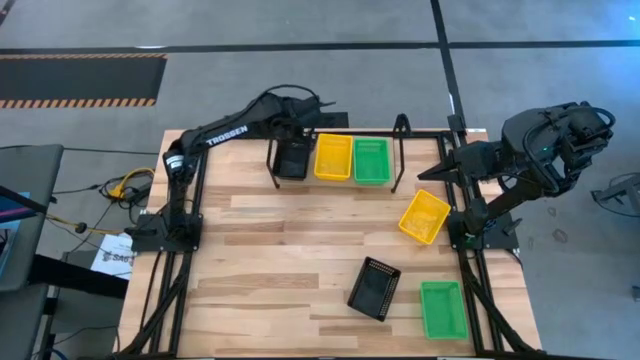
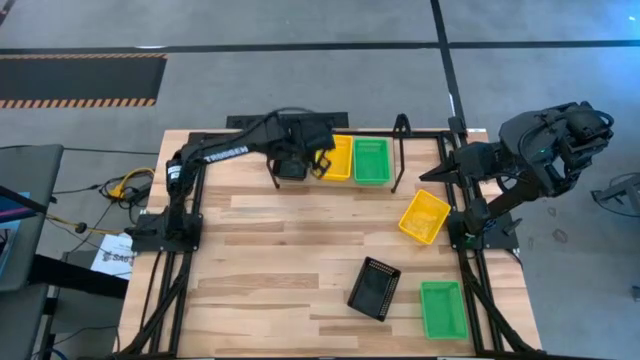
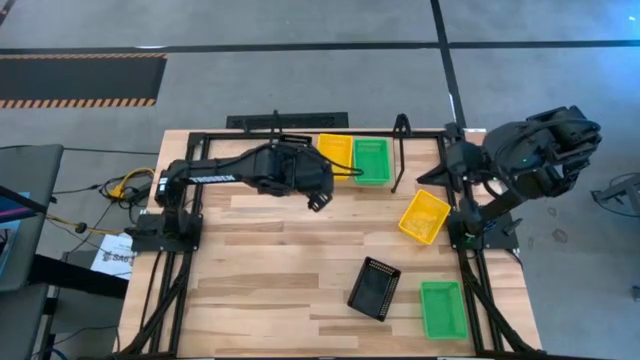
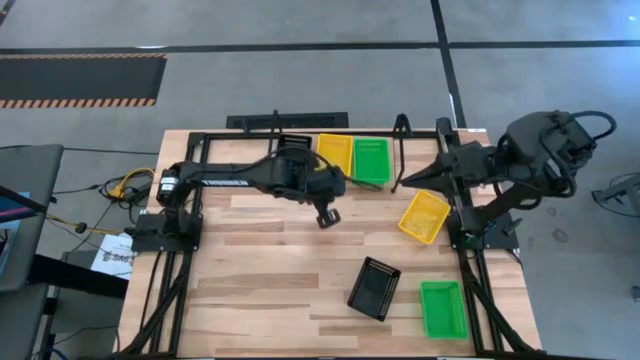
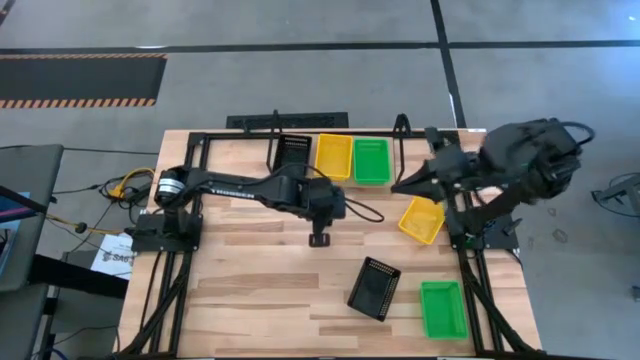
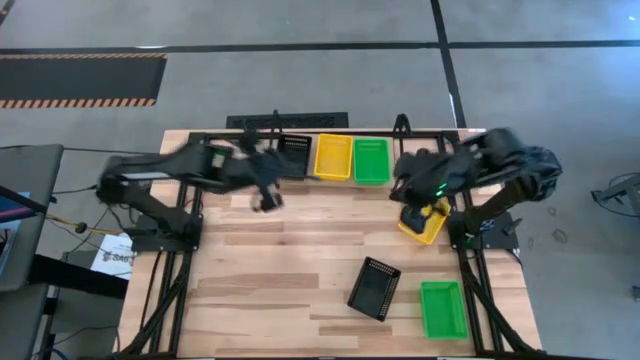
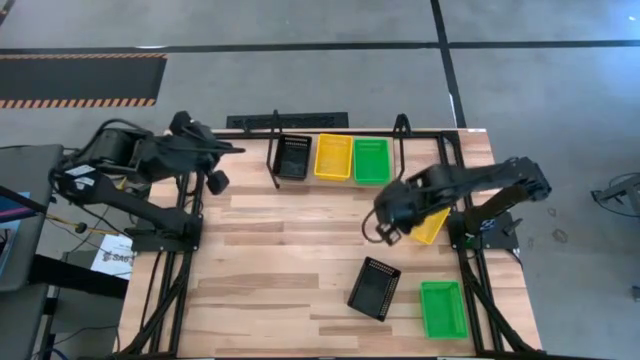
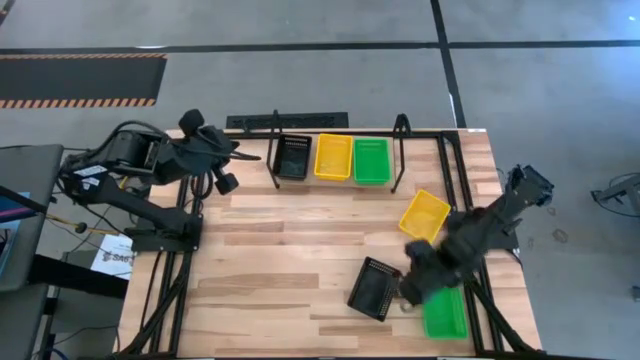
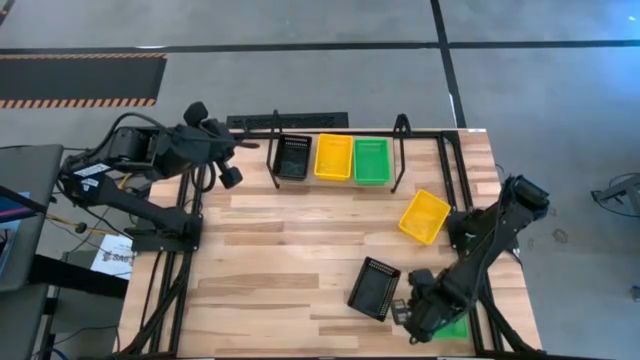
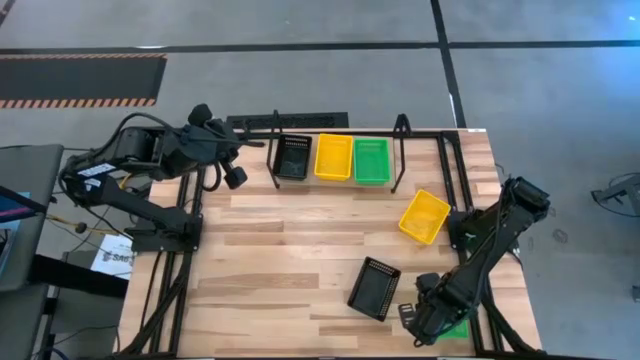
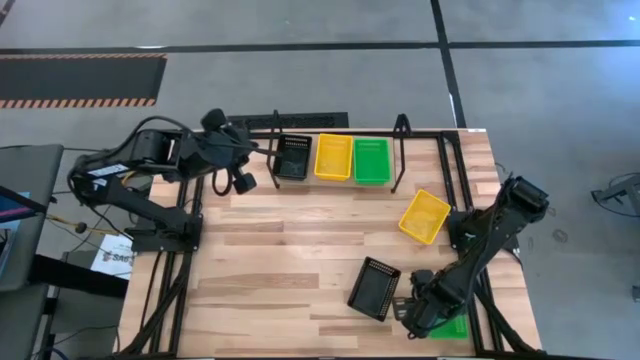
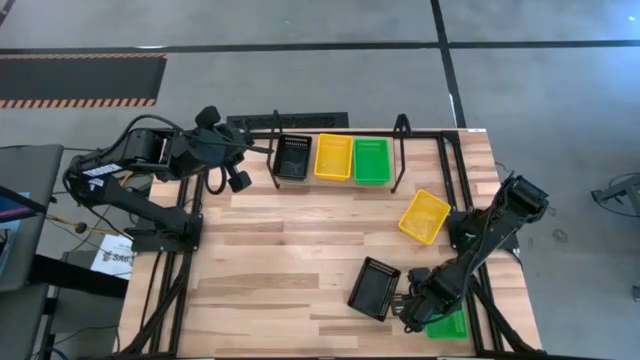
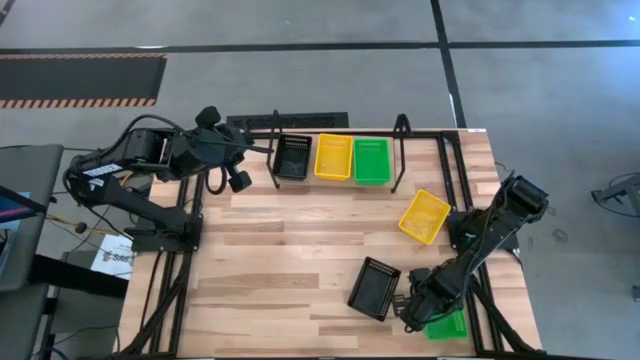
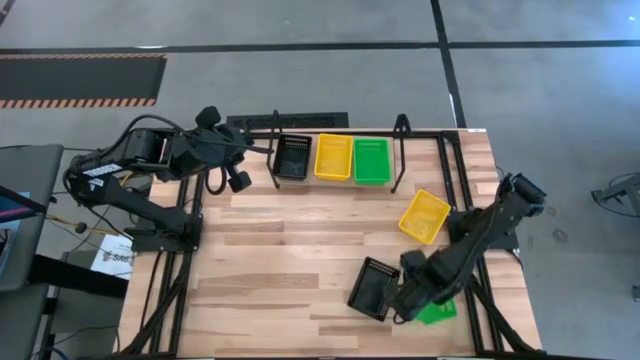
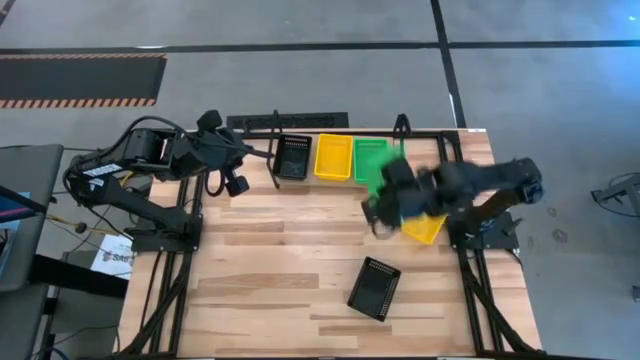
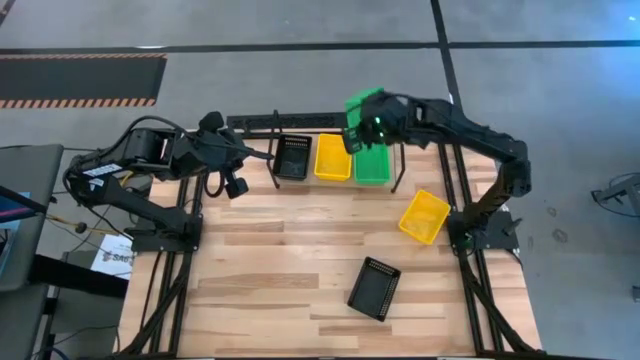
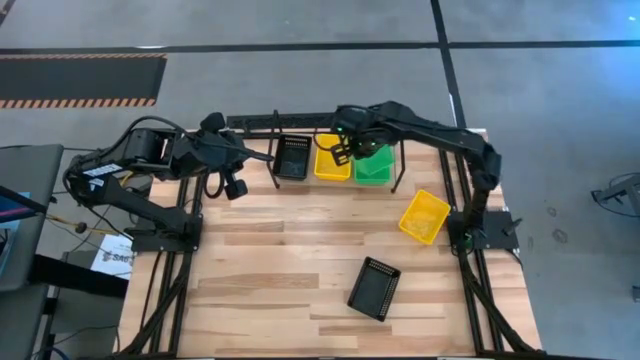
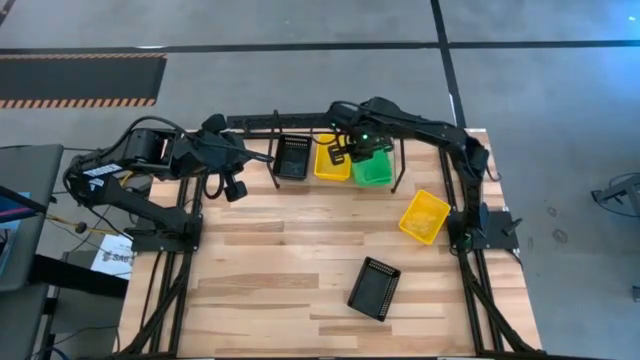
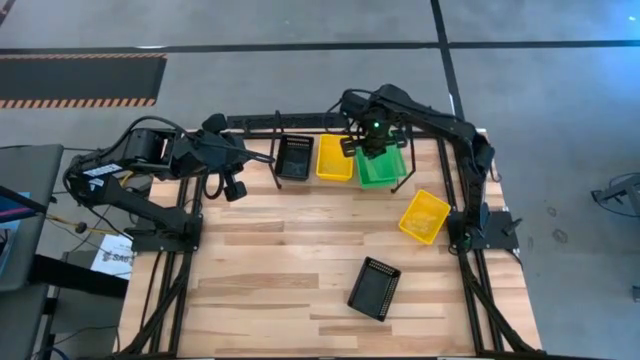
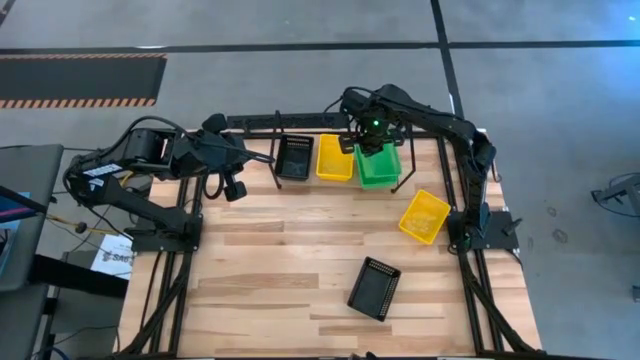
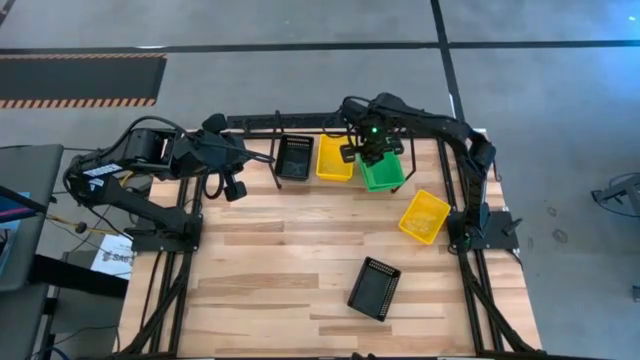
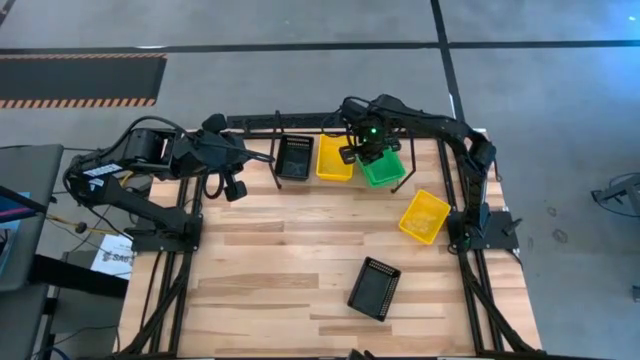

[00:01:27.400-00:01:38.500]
Task: Stack baskets on shelf by color
Stack the green bin on top of the green bins on the shelf

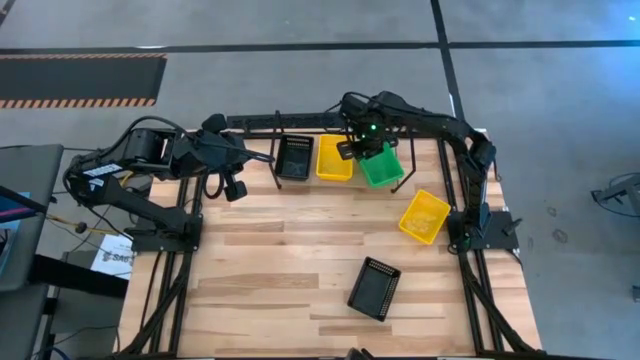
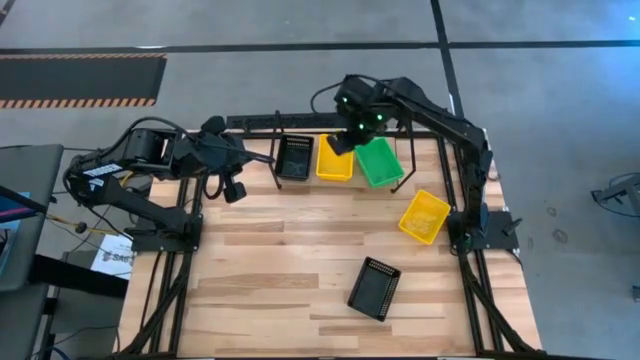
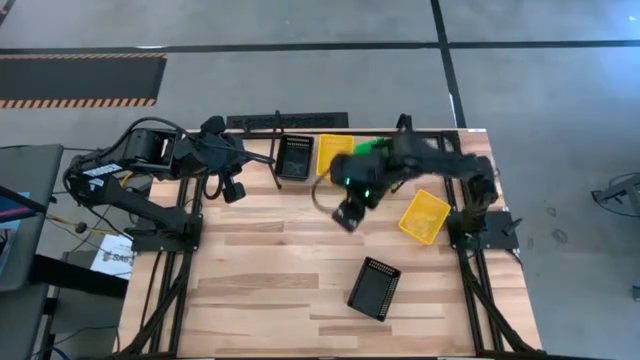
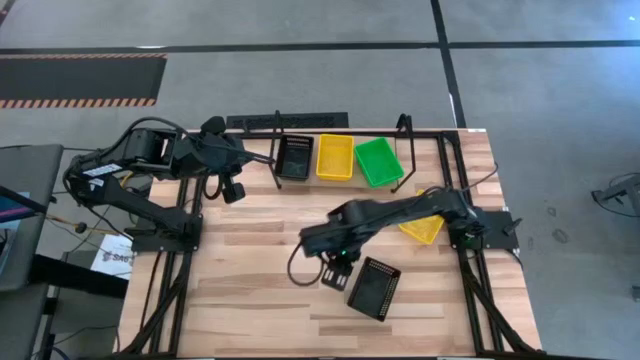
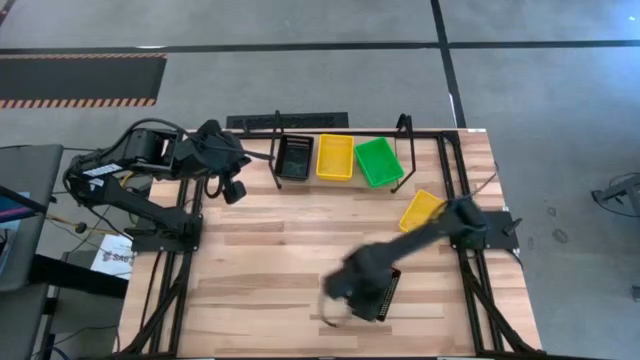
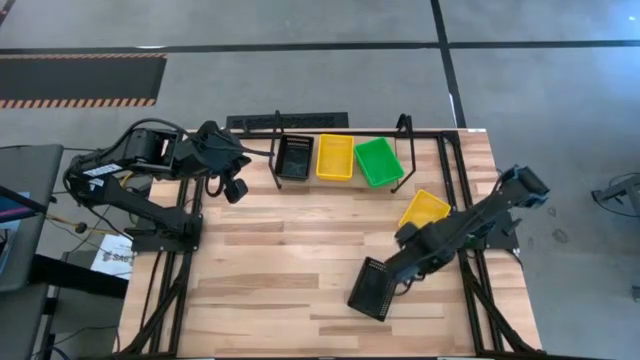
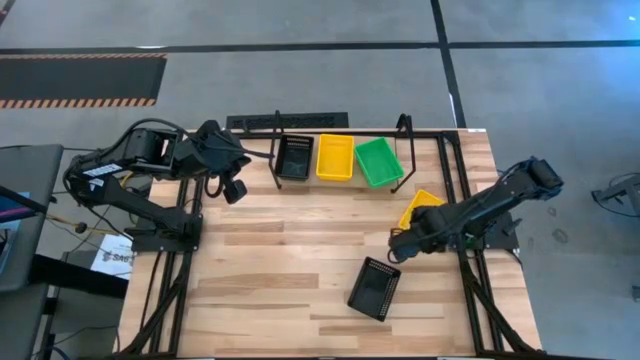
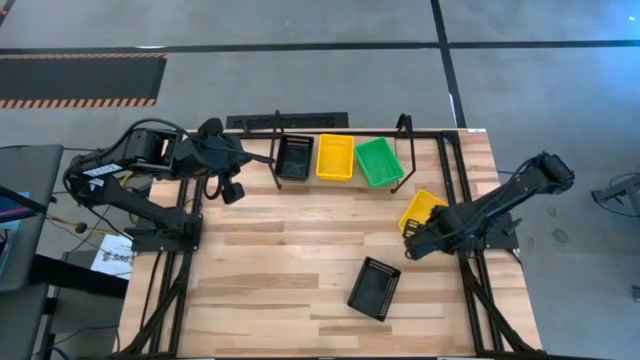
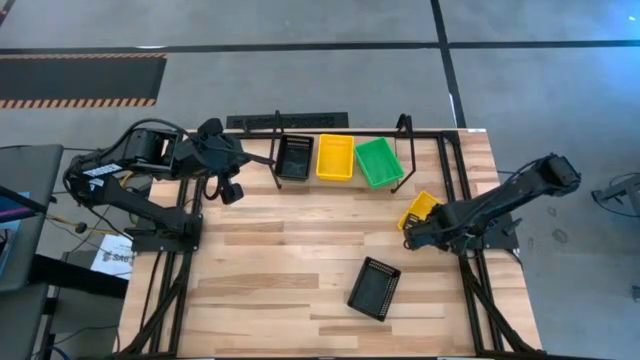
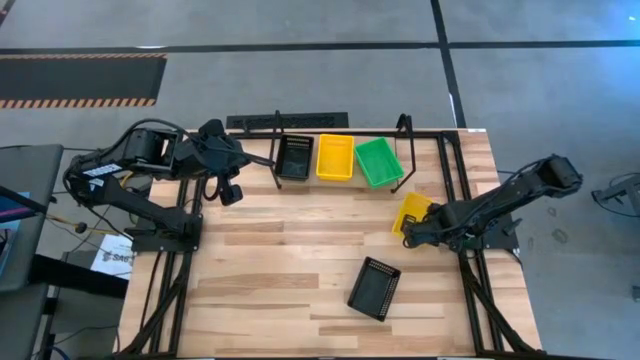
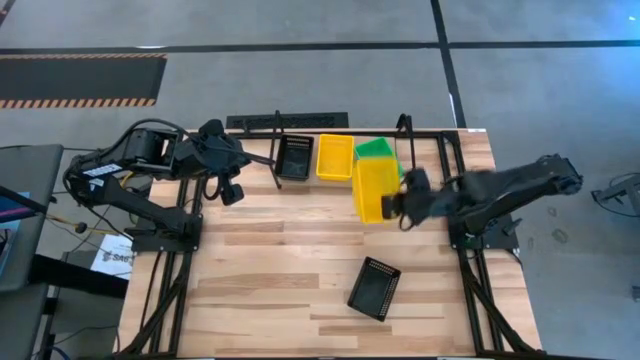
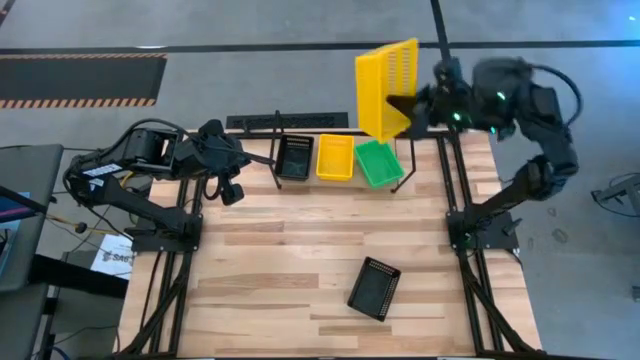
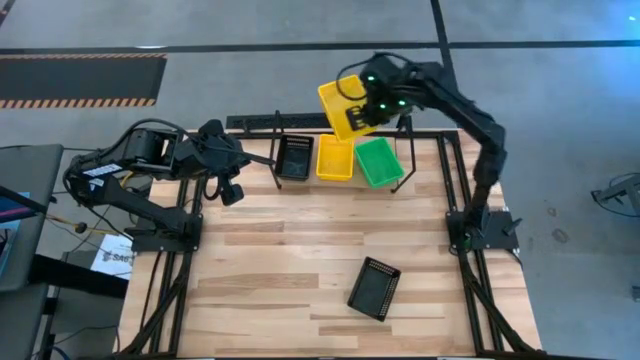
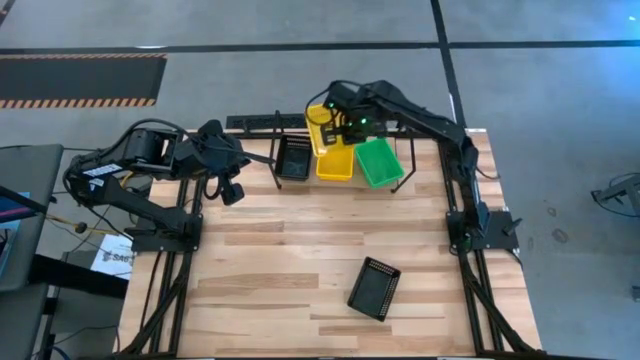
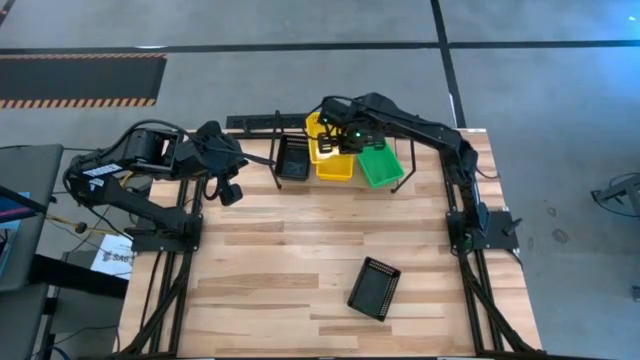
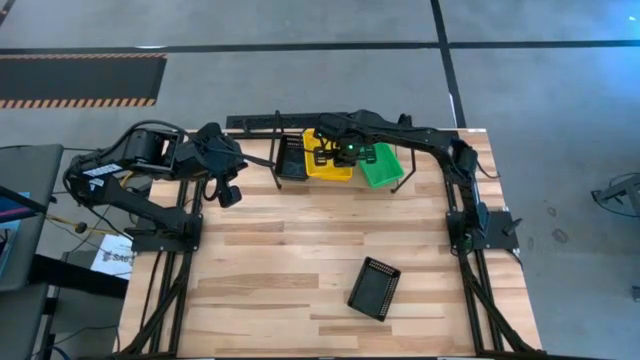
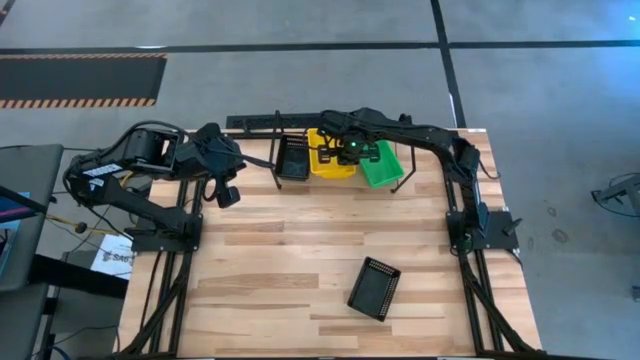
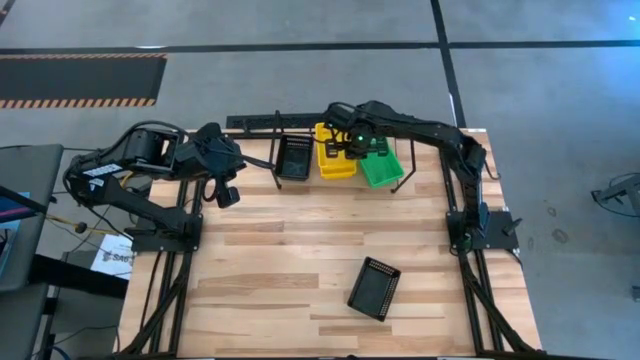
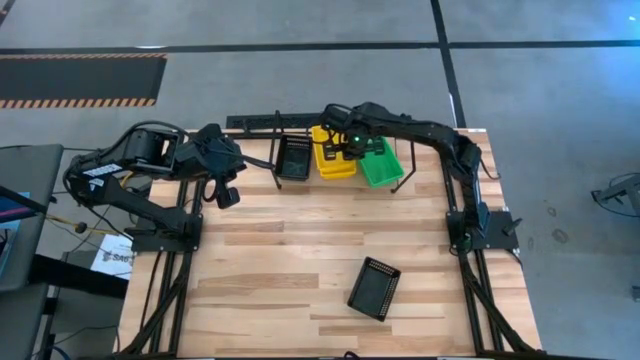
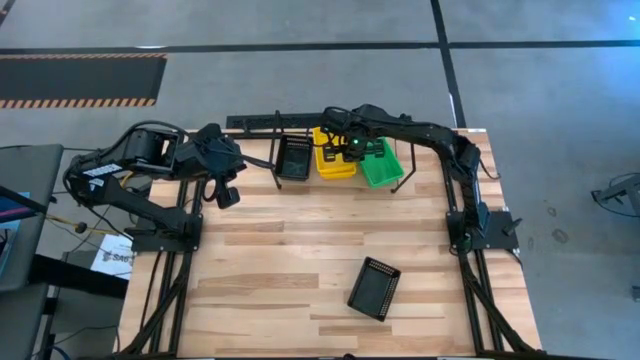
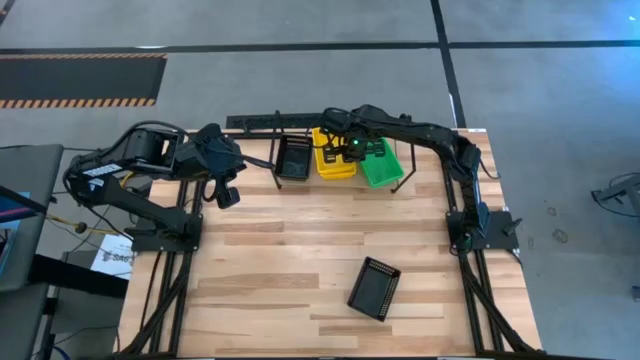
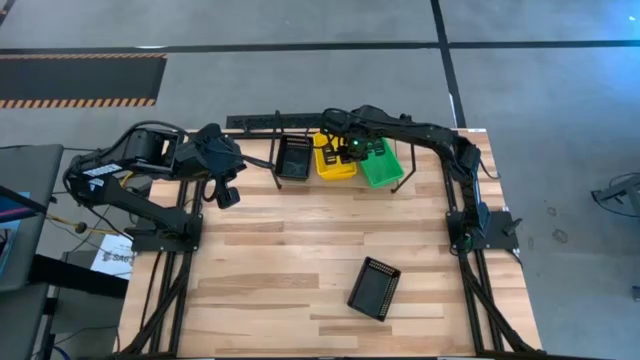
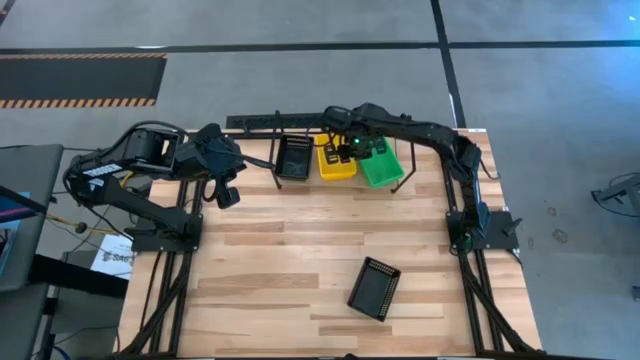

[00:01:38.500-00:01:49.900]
Stack the yellow bin on top of the yellow bins on the shelf
